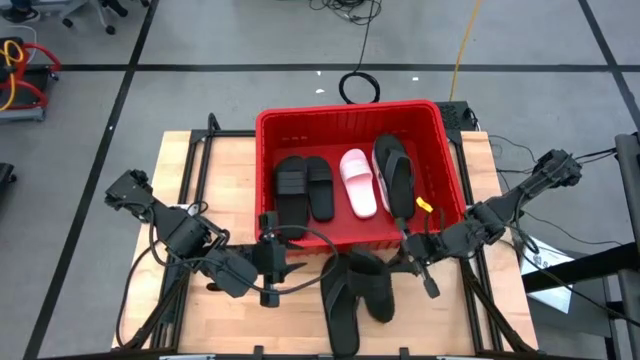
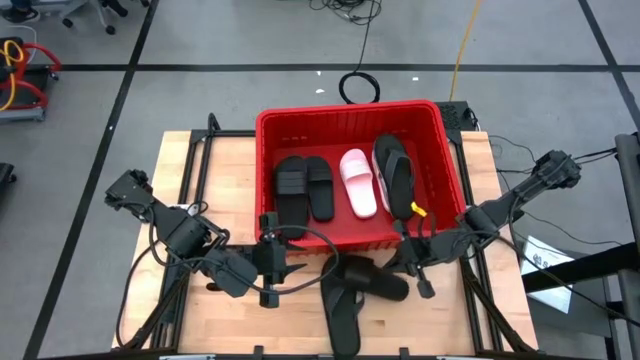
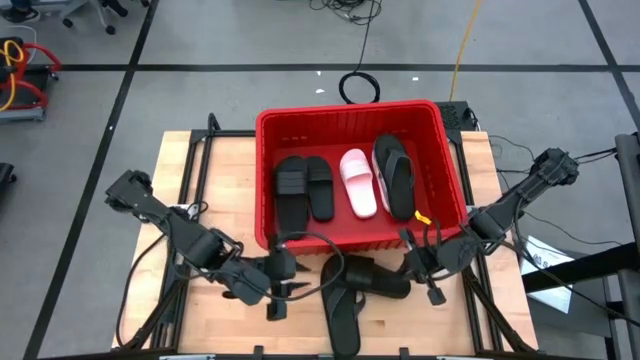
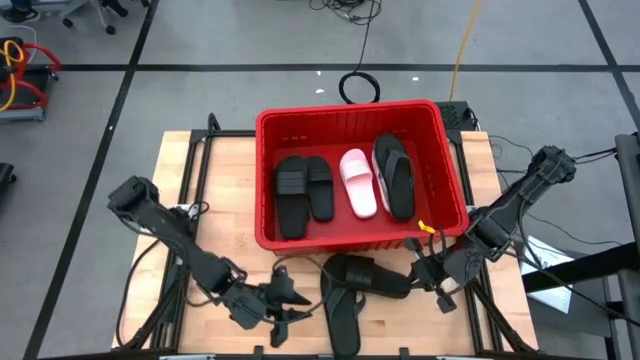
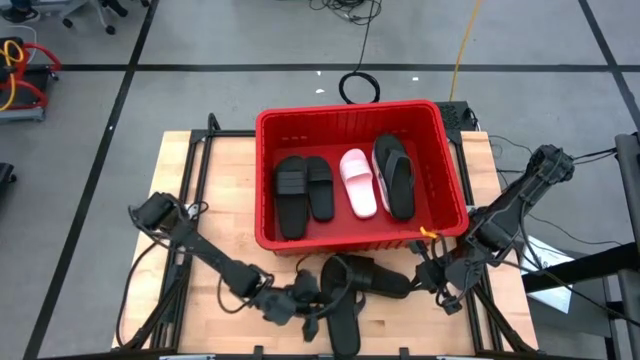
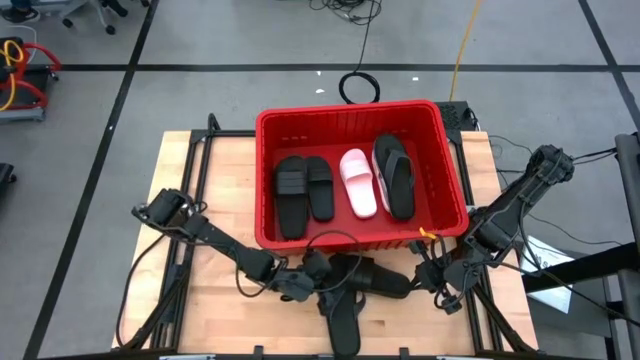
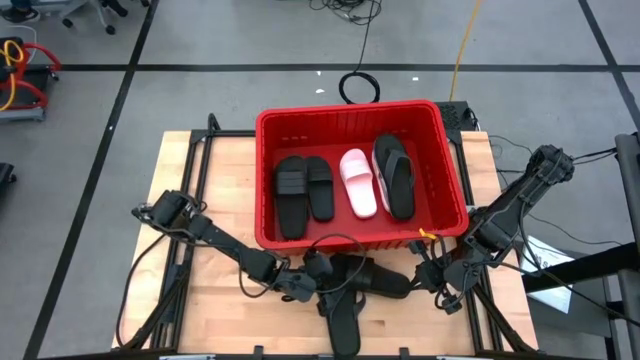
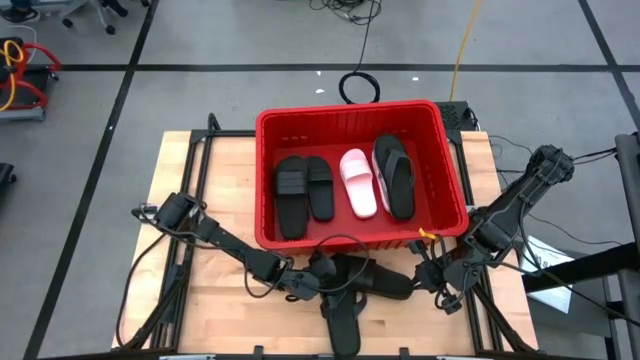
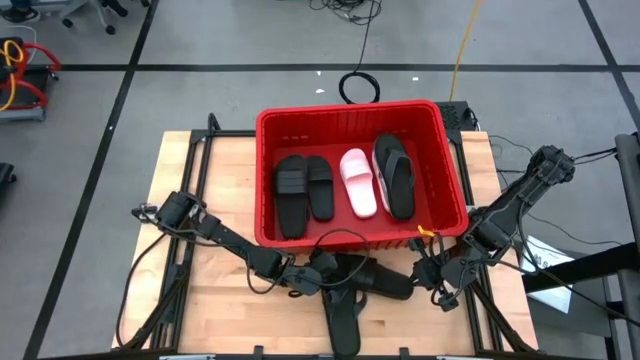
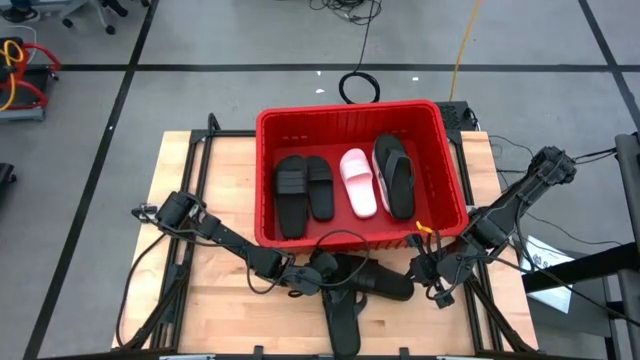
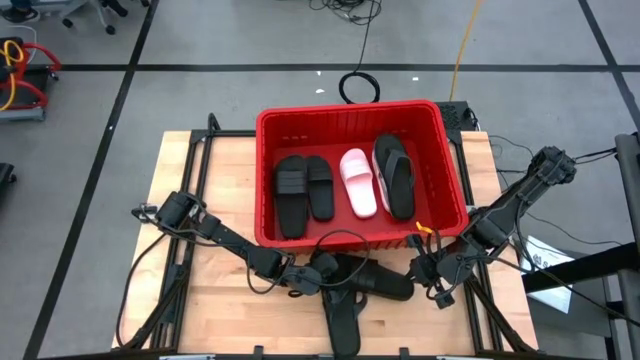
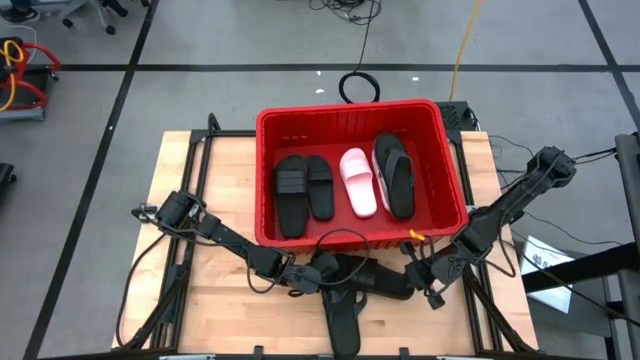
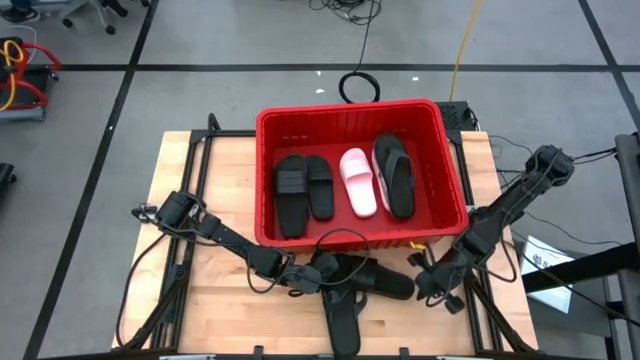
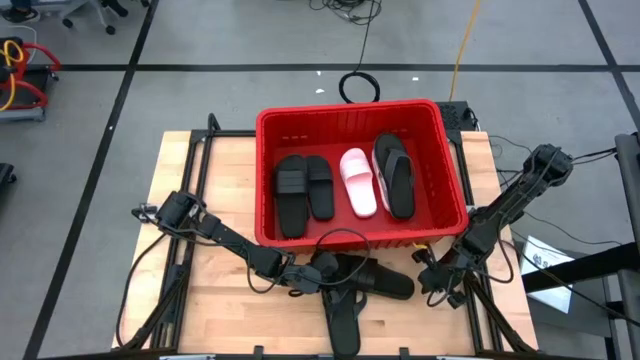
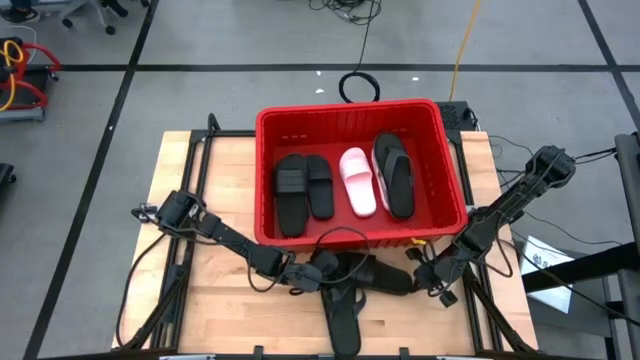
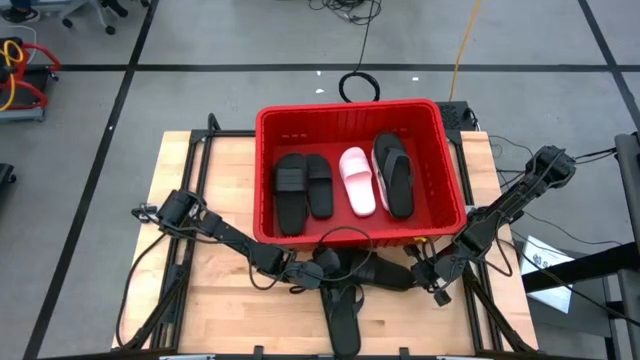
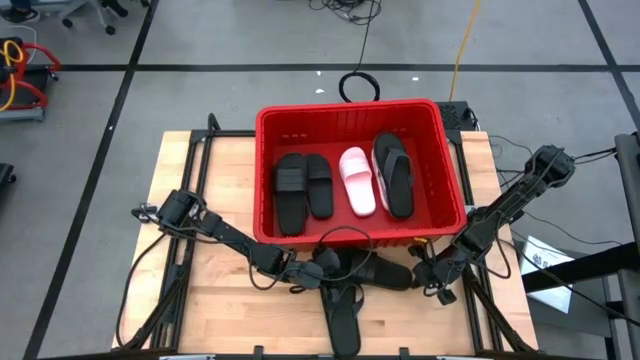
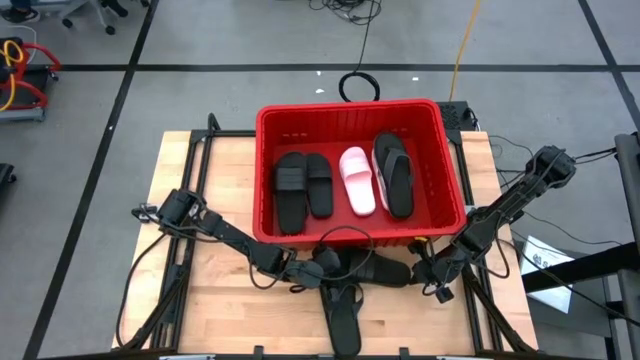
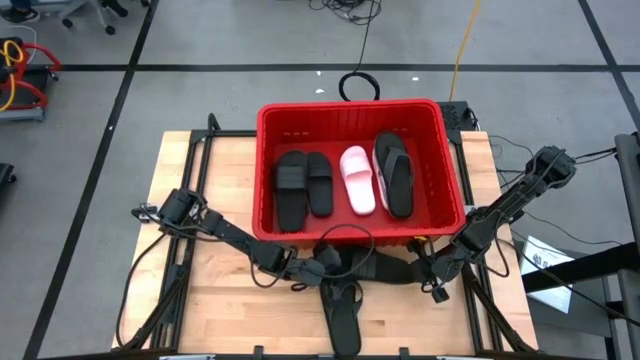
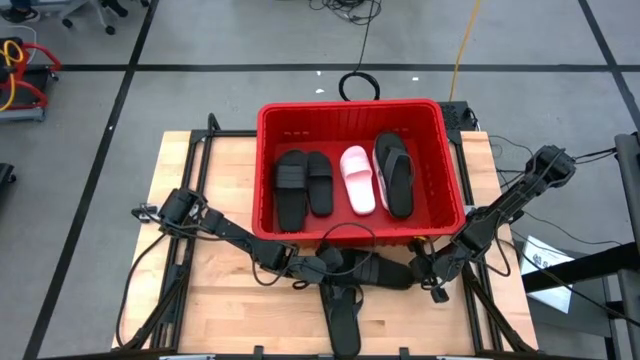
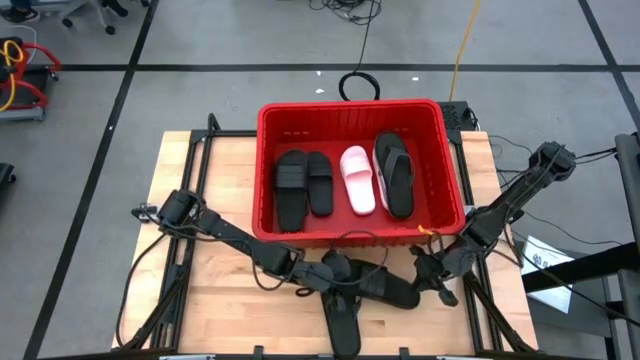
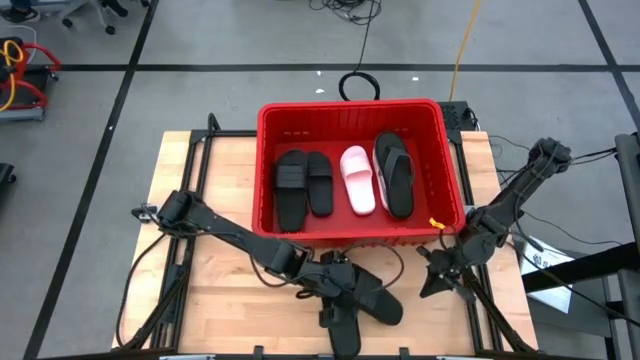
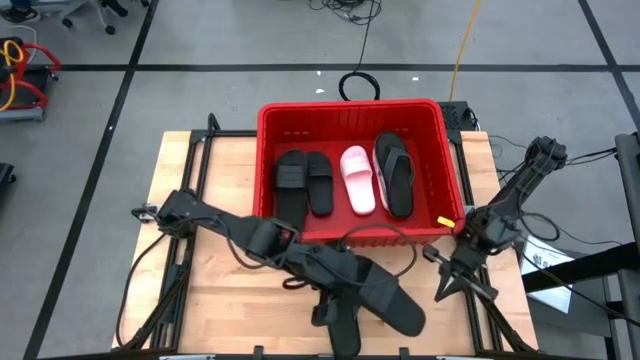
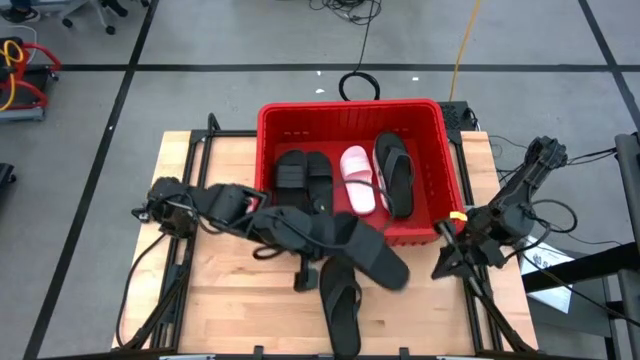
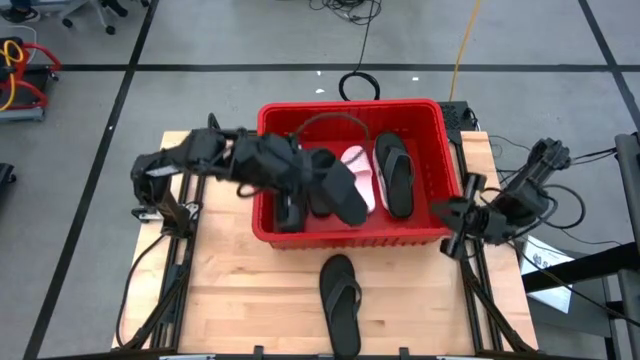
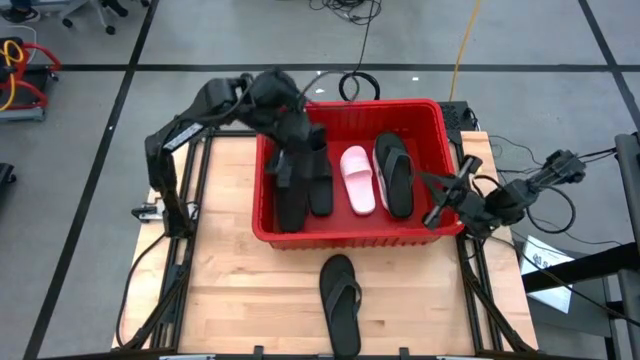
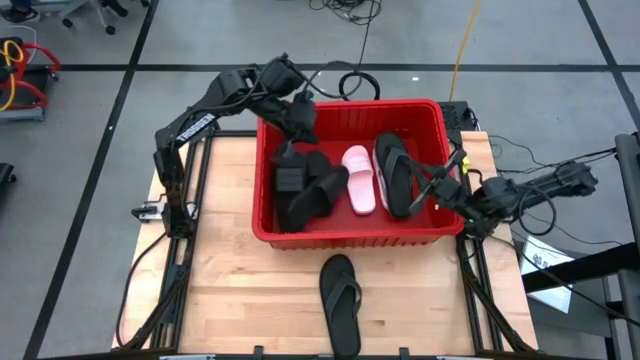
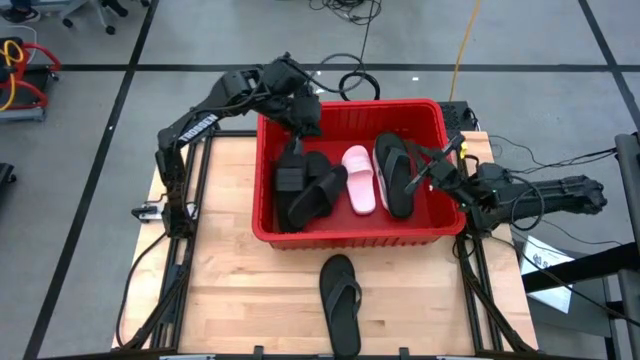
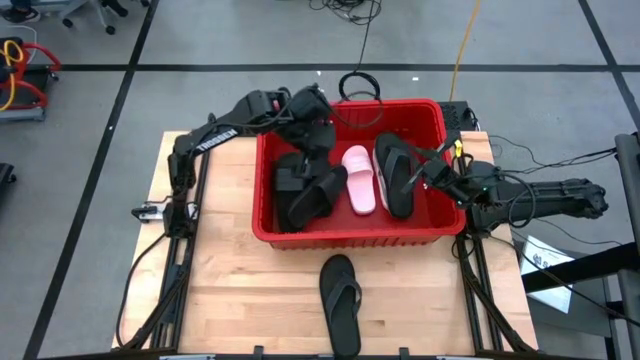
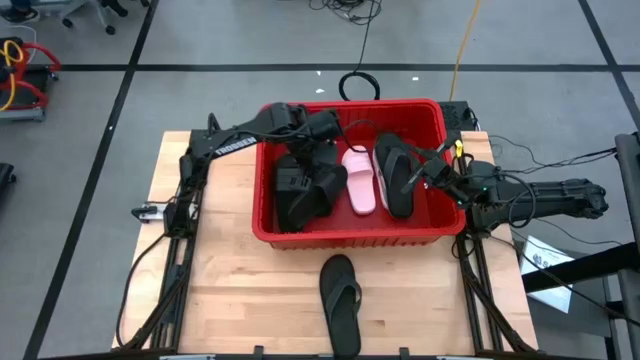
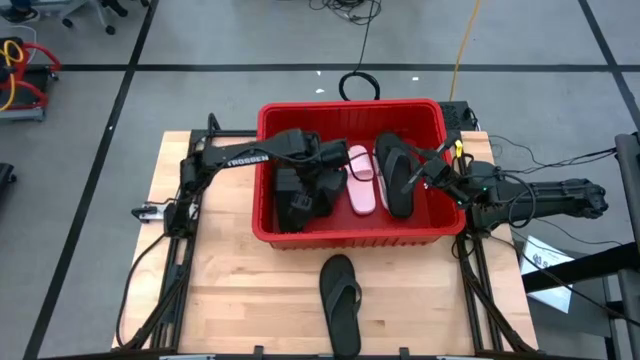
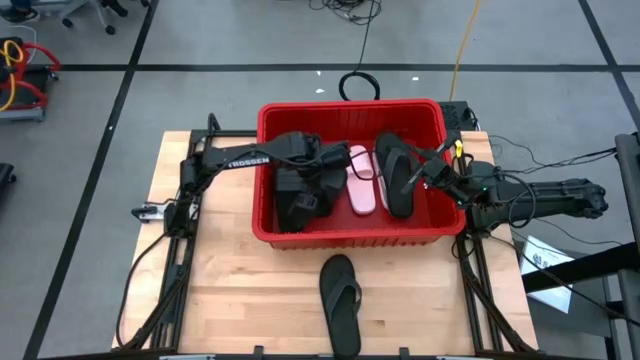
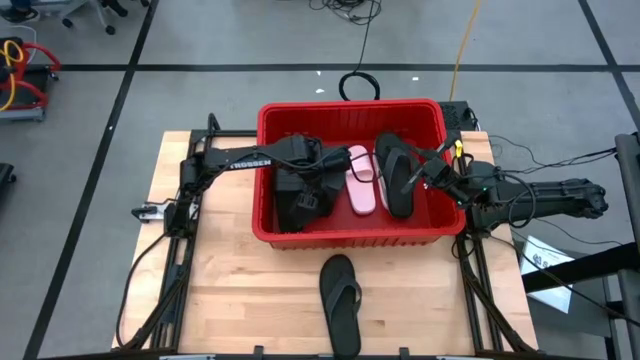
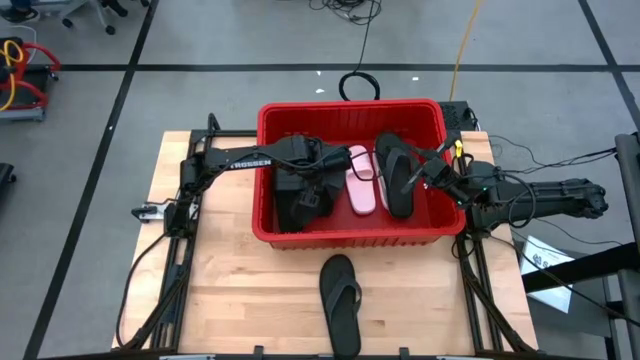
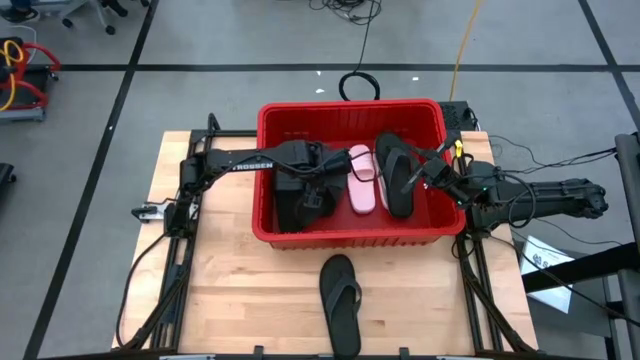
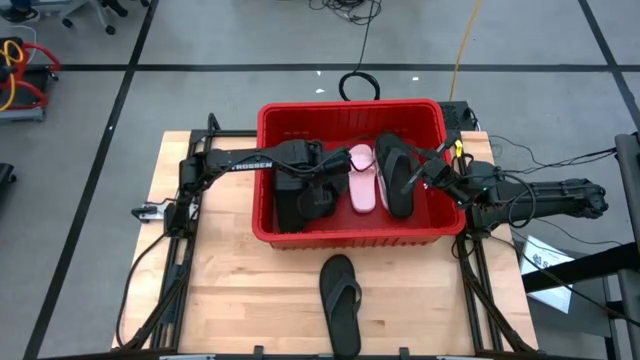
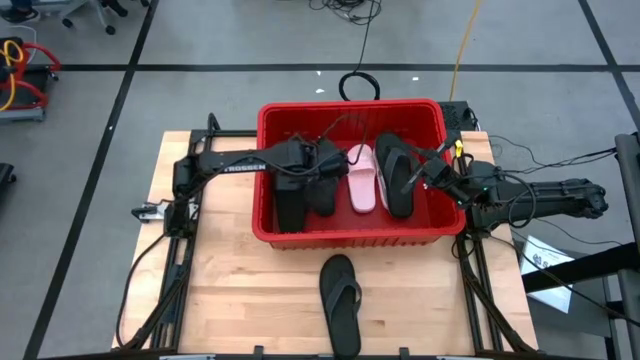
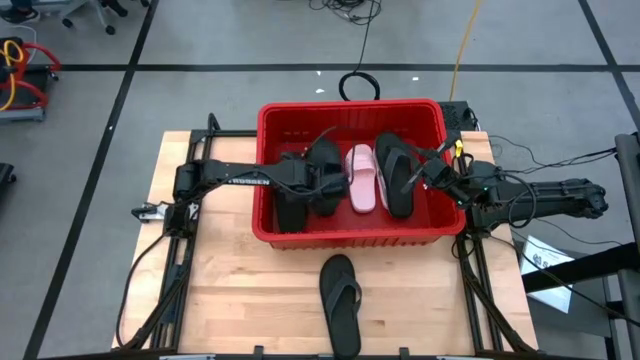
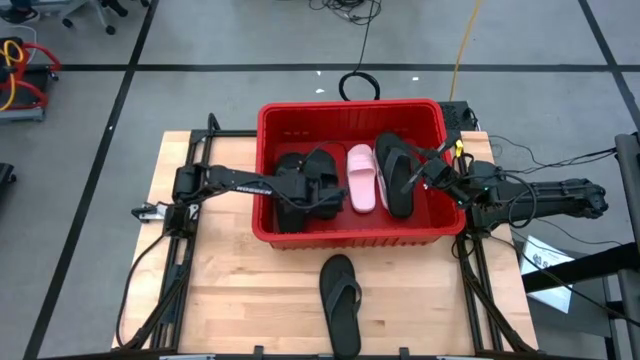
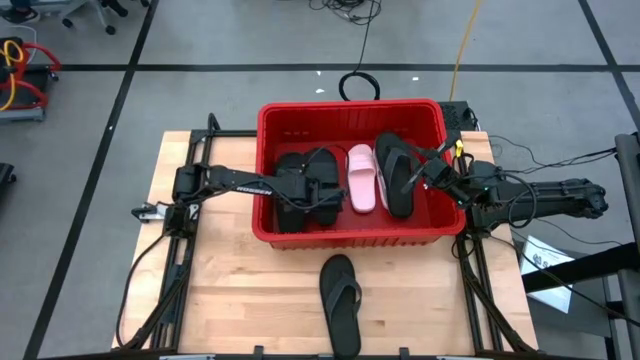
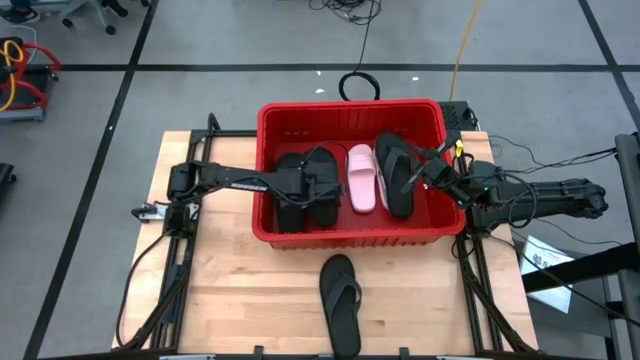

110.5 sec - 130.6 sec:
Task: Pick and place slides into bin
Put the black slide into the red bin

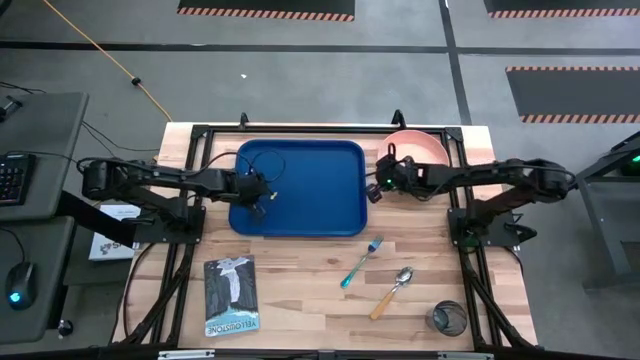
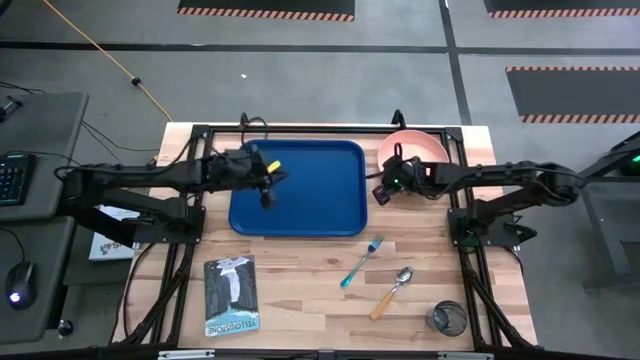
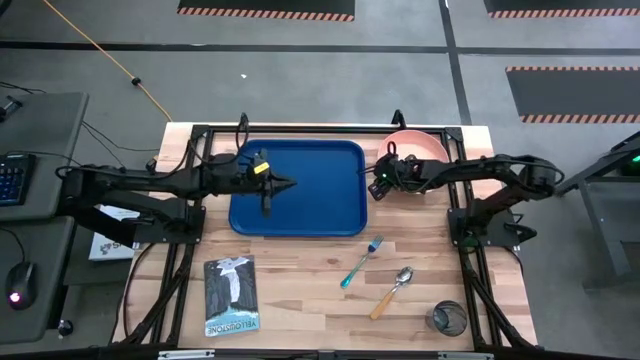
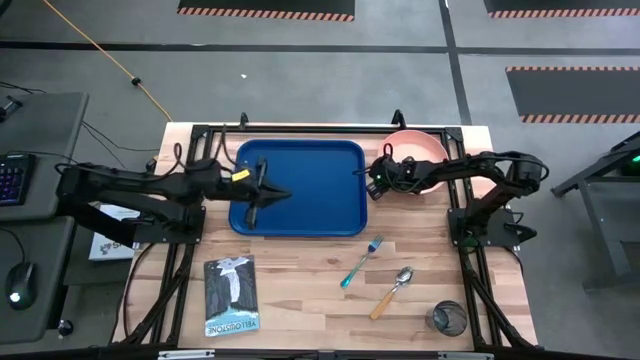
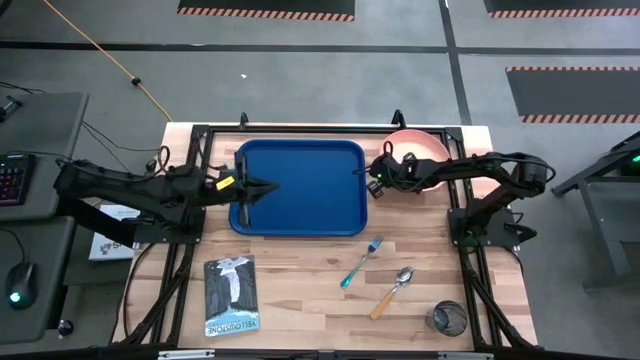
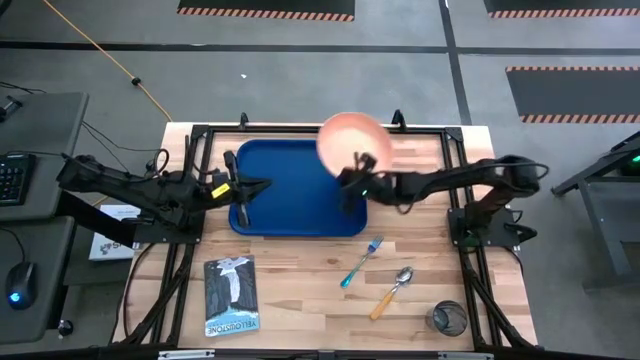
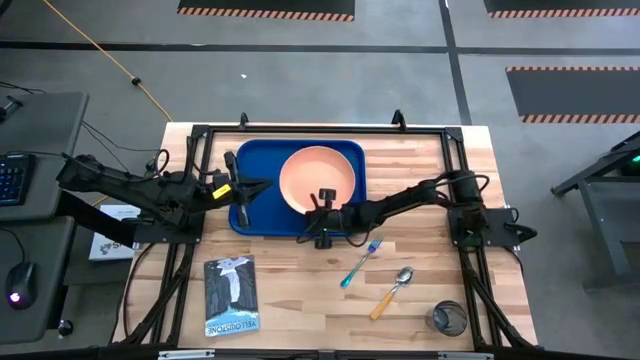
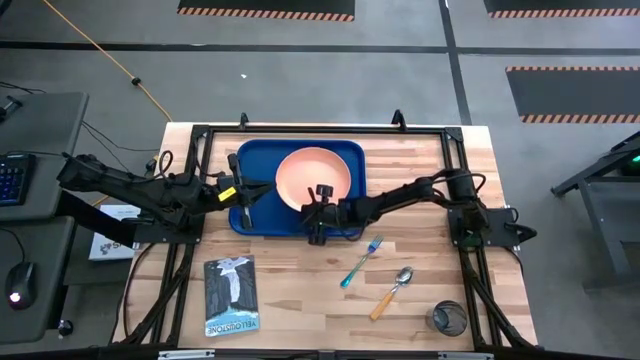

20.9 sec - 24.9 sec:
Task: Pick and place plate/cup/fork/spoon on tray
Put the orange plate on the blue tray
